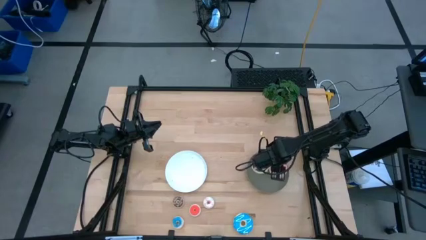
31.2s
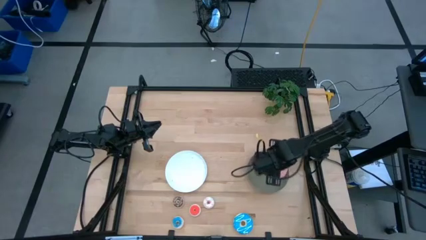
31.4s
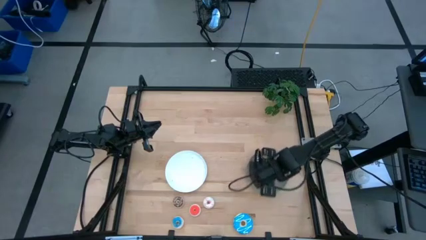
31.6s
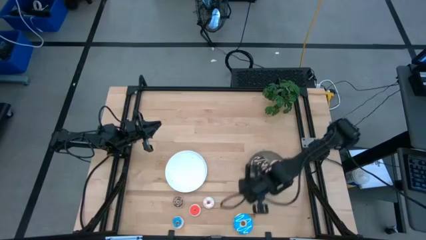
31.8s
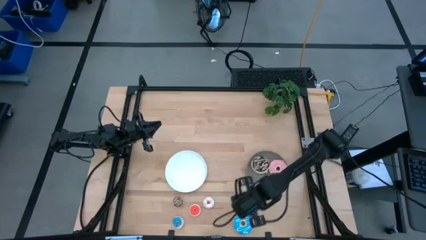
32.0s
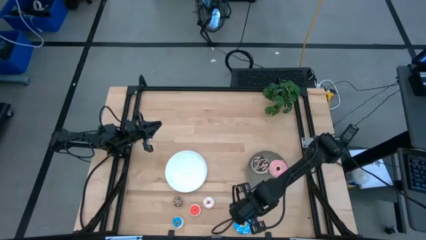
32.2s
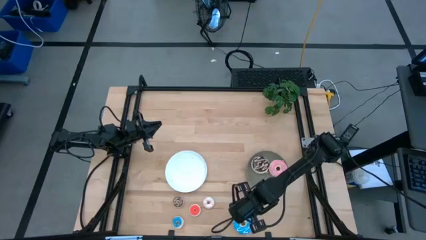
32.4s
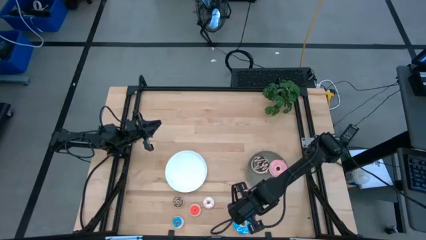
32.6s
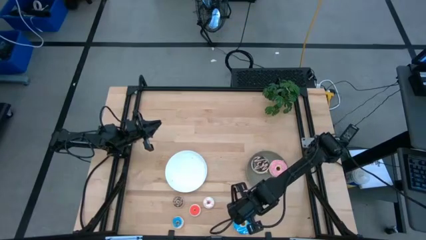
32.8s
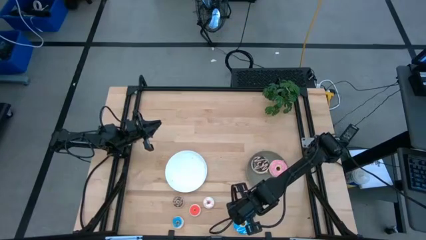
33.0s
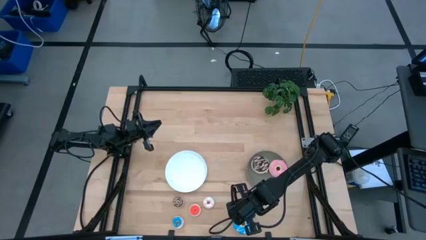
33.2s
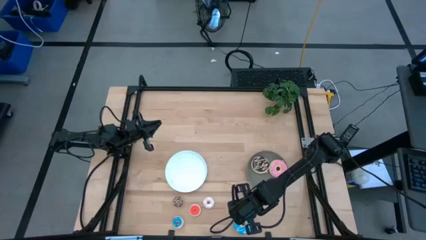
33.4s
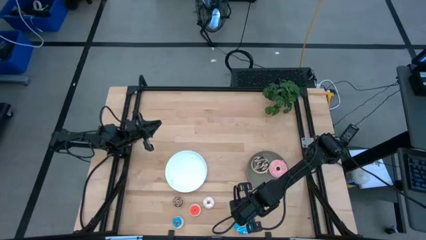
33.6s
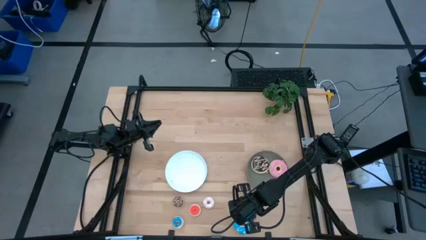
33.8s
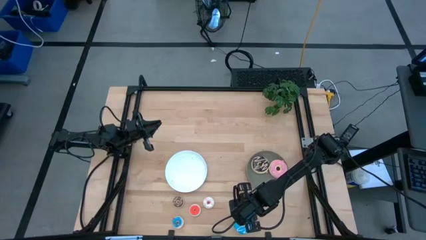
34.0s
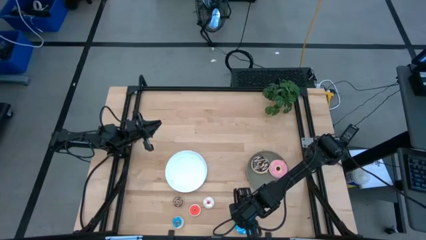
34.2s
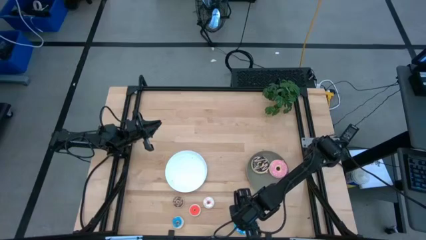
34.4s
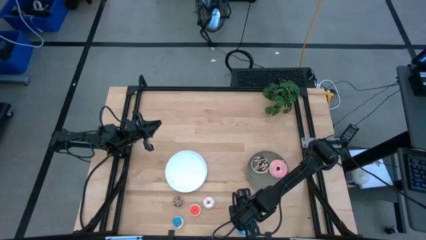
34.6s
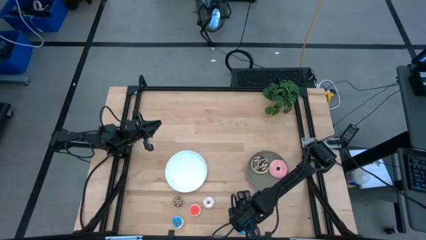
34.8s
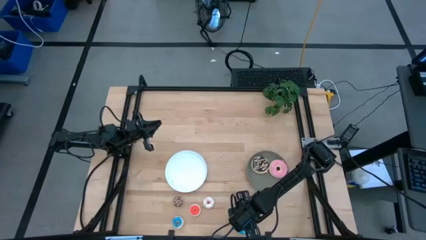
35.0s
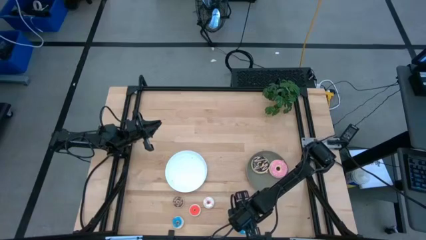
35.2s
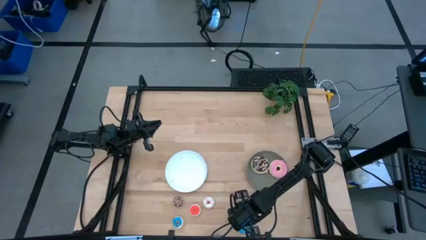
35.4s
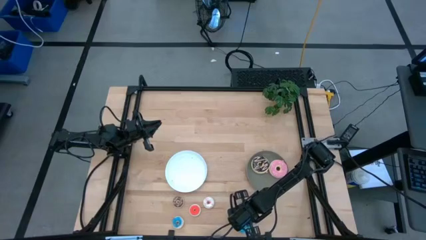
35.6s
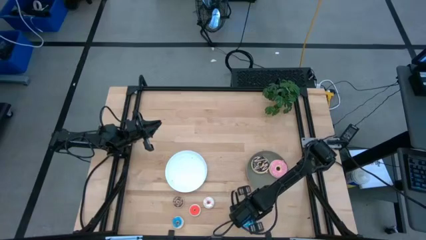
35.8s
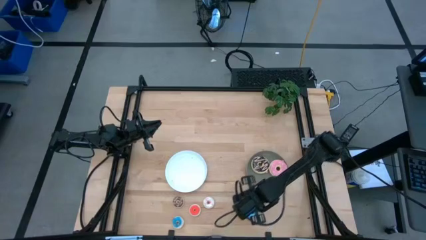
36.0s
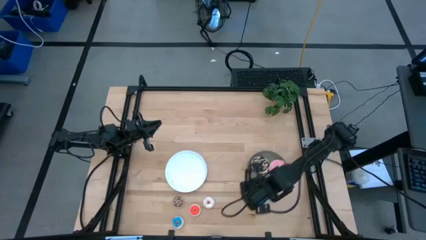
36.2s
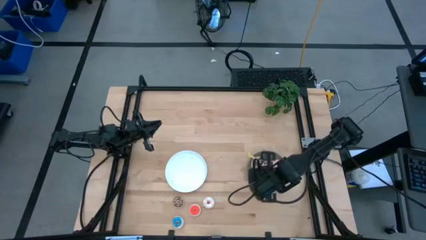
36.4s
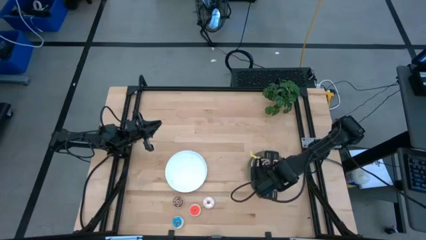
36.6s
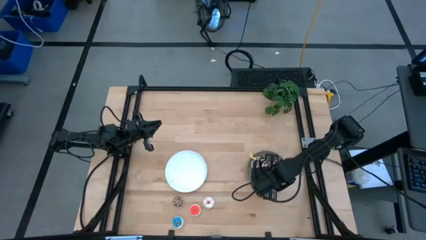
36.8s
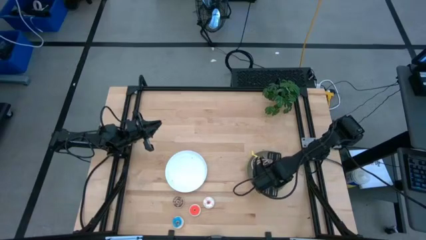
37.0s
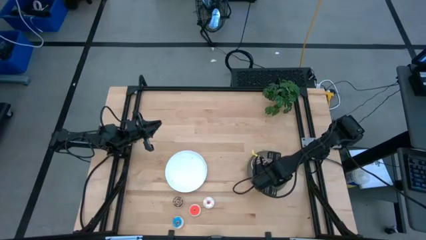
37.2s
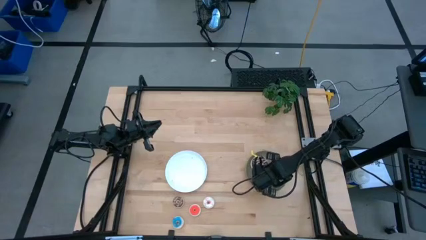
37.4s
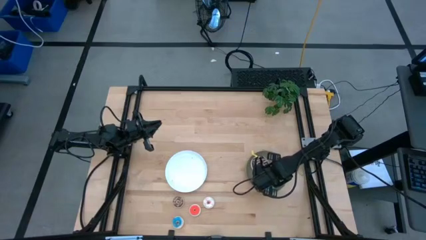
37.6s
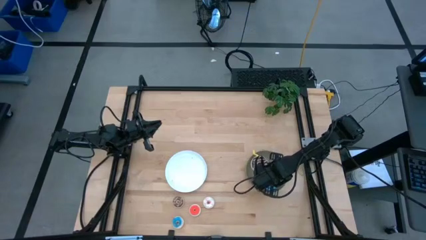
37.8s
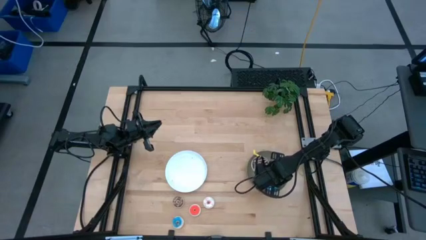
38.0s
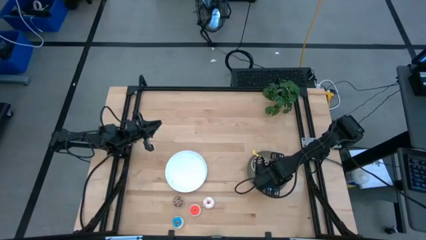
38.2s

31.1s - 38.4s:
Task: Pick & Place donuts
Put the large blue donut on the gray plate

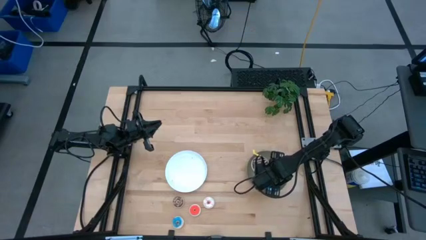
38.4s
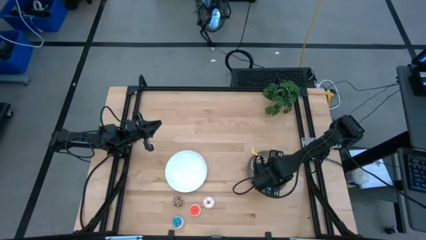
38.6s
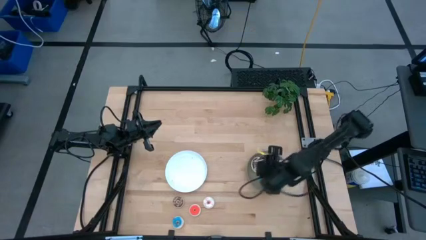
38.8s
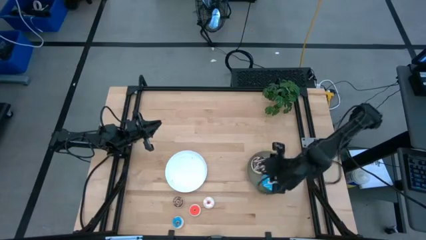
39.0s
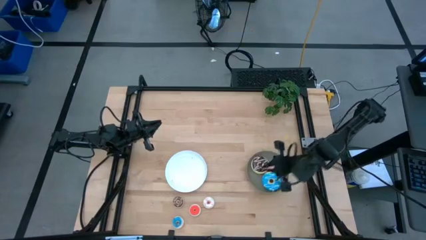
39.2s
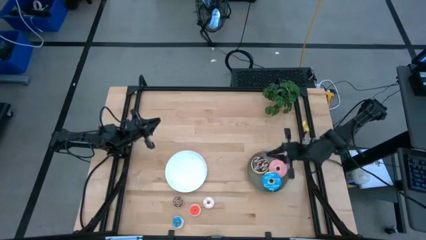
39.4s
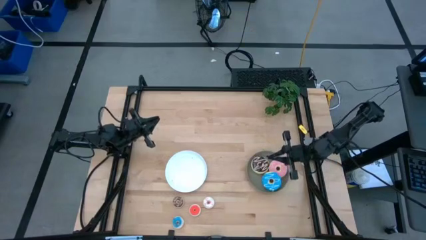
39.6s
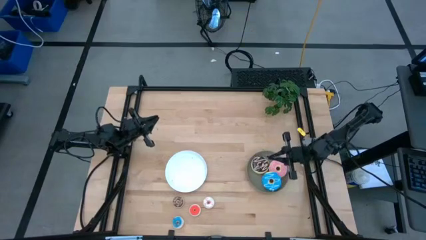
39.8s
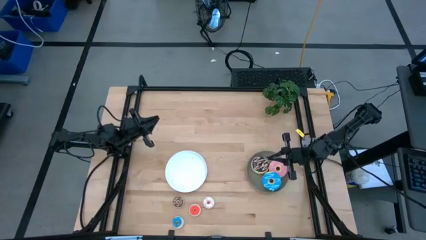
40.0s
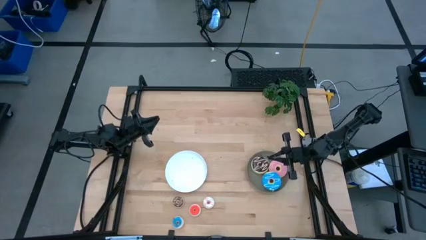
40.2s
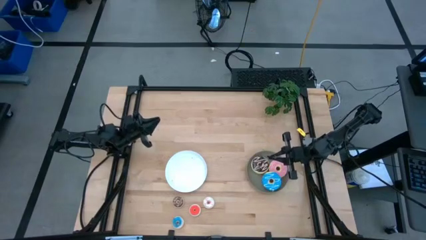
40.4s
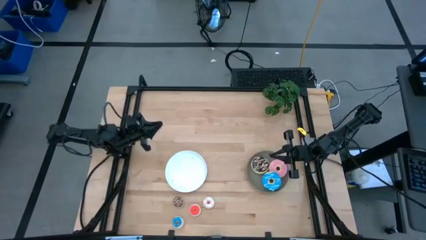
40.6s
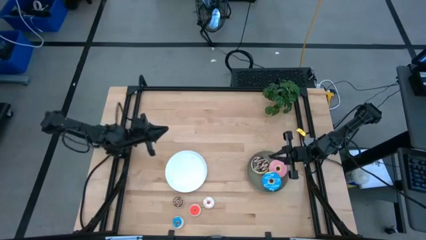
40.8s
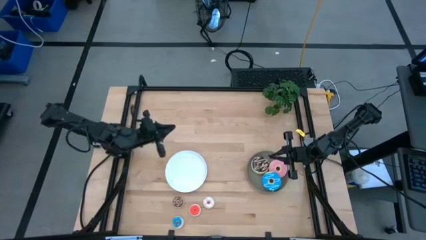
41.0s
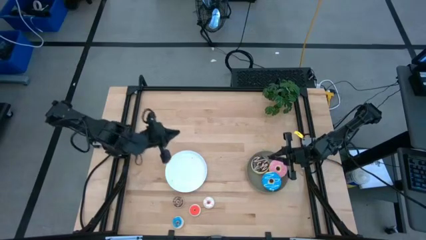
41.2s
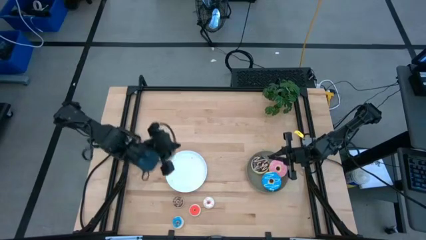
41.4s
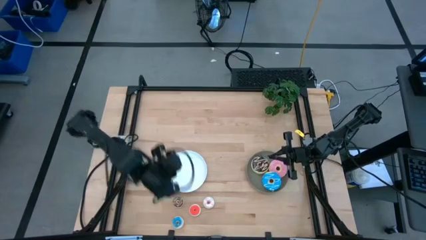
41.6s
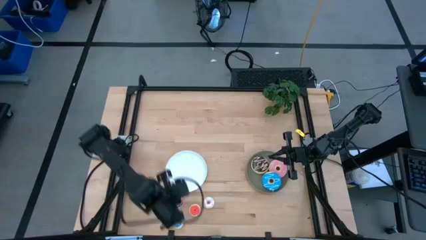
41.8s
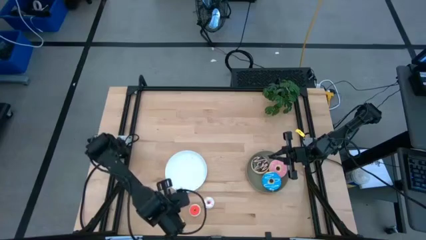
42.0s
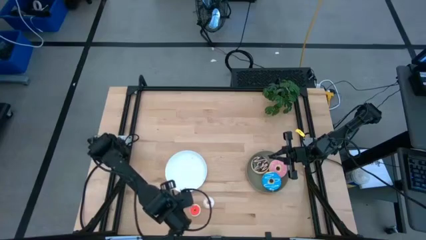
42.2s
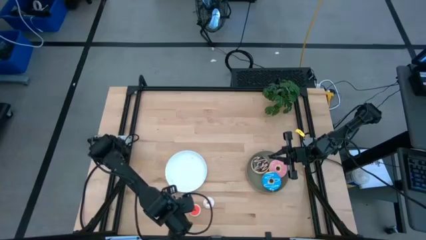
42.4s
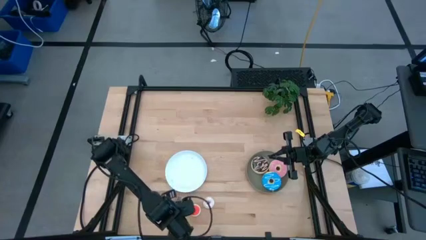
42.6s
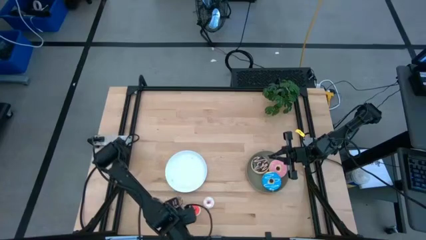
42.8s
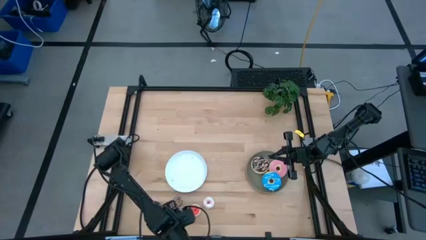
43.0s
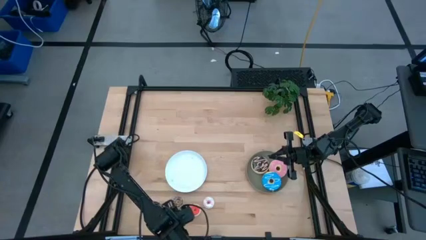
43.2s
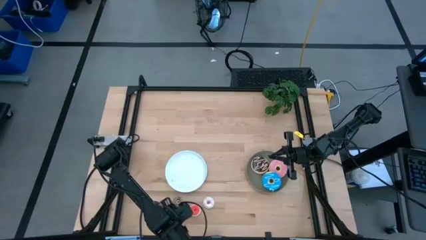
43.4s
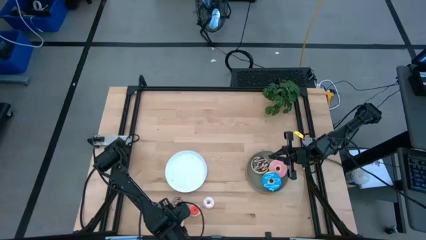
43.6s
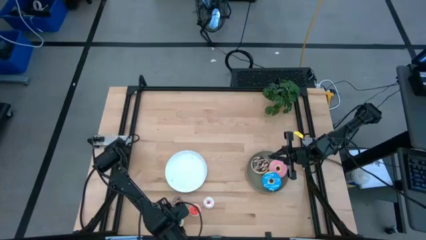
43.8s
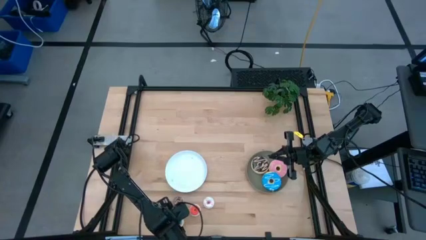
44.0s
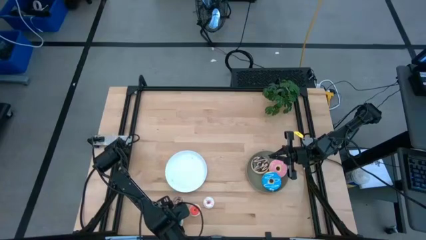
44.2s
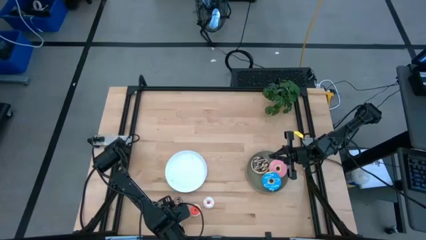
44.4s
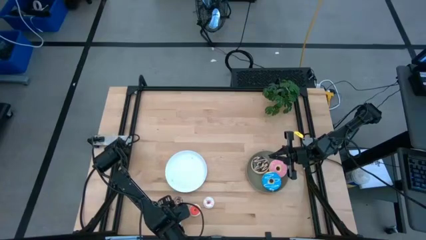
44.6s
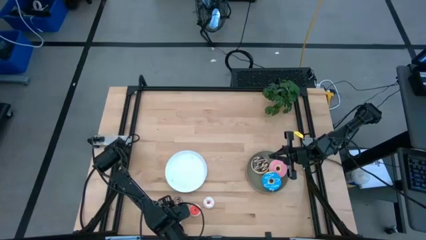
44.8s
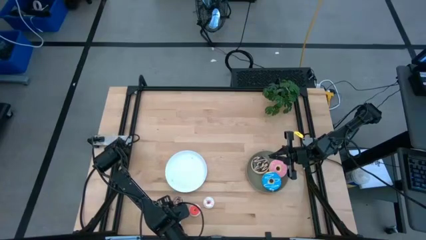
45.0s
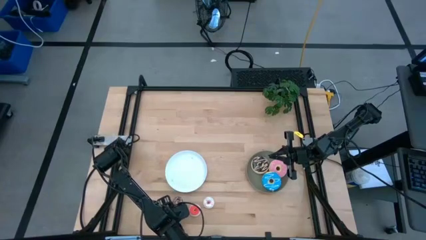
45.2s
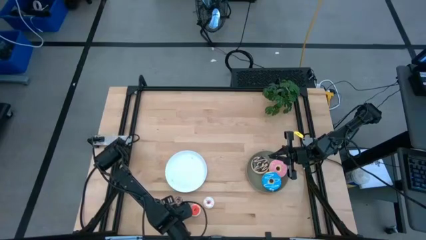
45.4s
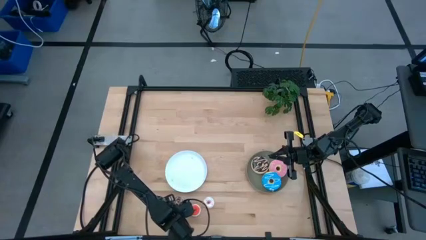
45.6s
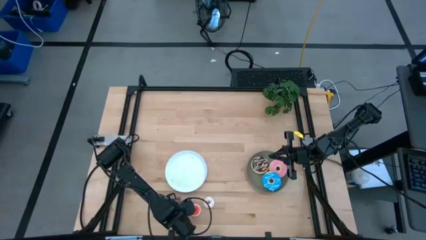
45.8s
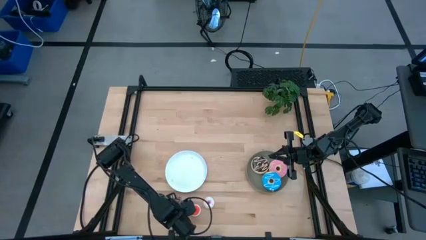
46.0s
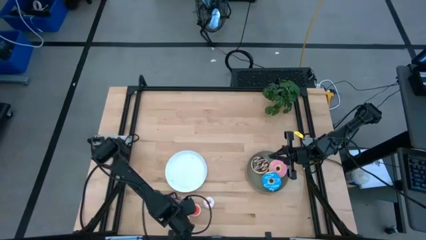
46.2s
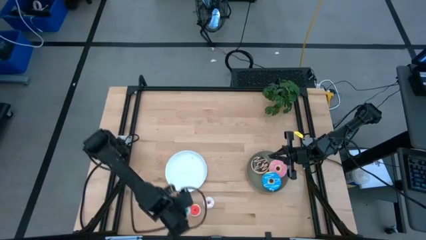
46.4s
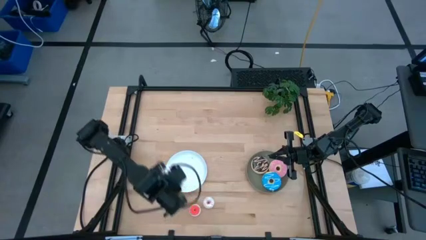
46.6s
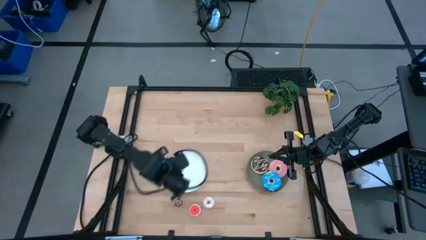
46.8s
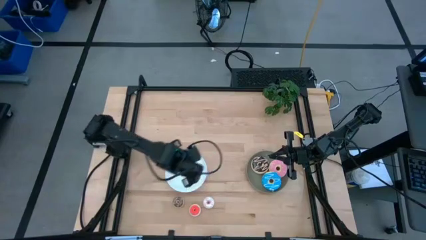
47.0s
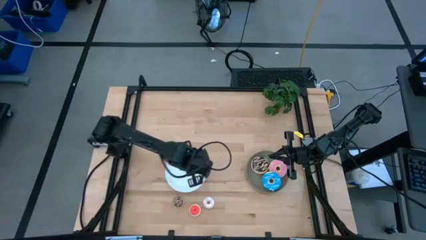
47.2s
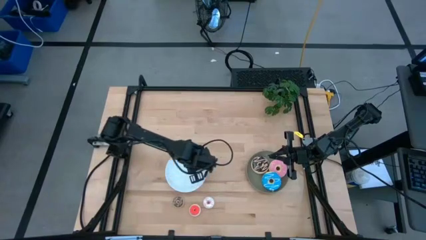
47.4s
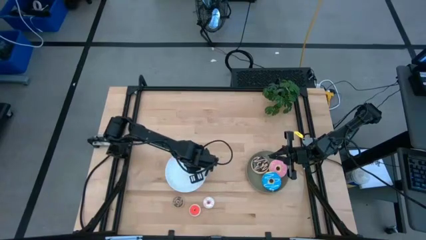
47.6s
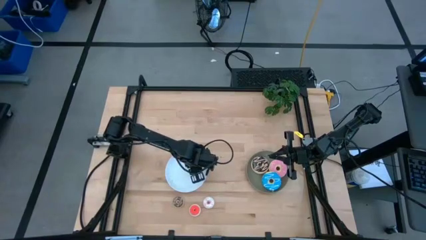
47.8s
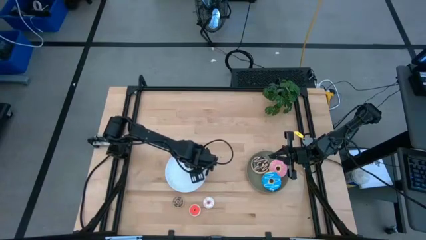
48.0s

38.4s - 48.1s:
Put the small blue donut on the white plate
